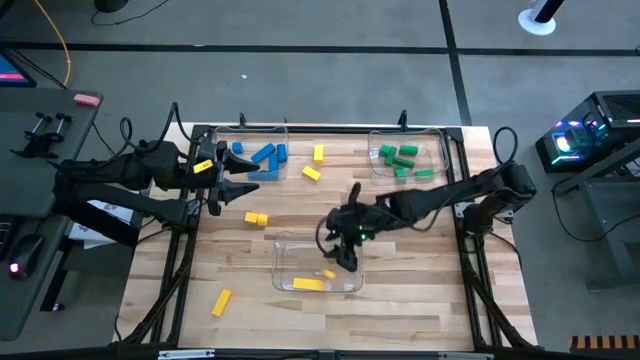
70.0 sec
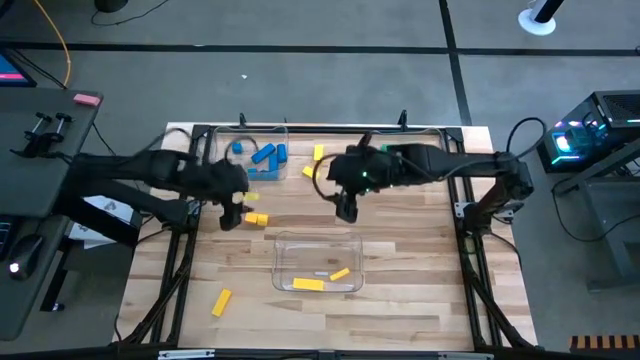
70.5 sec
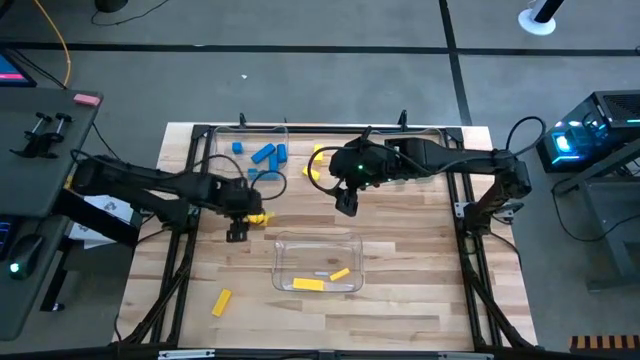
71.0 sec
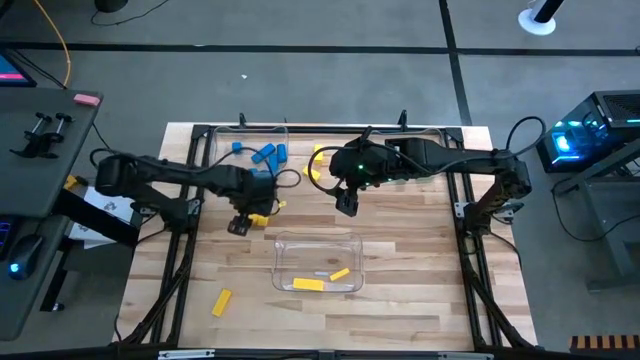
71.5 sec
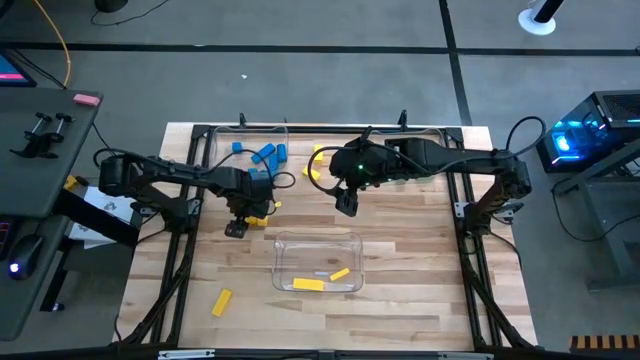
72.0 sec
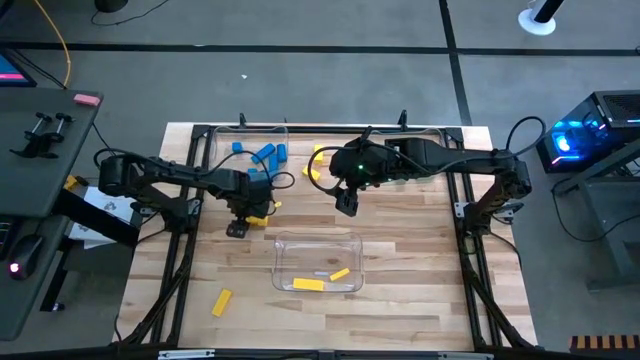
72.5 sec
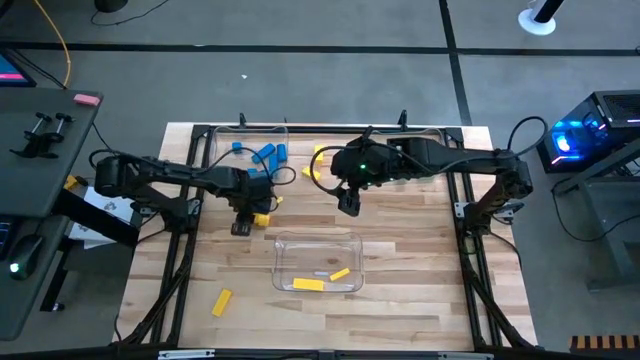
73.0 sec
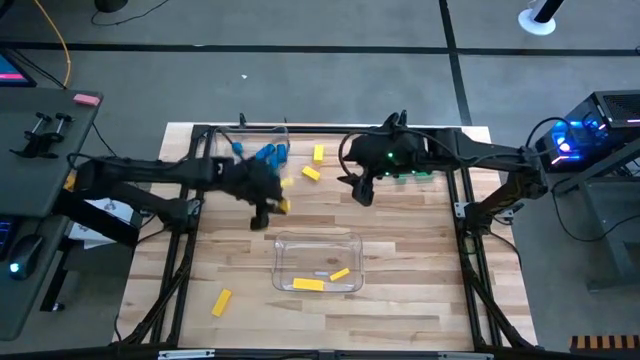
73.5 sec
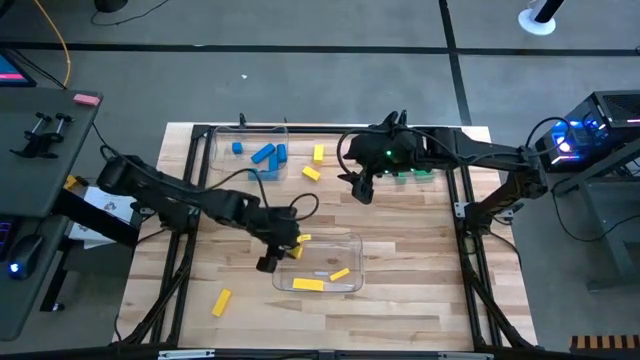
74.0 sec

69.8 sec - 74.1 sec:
Task: Sort blocks
Put the yellow block into the center transparent bin

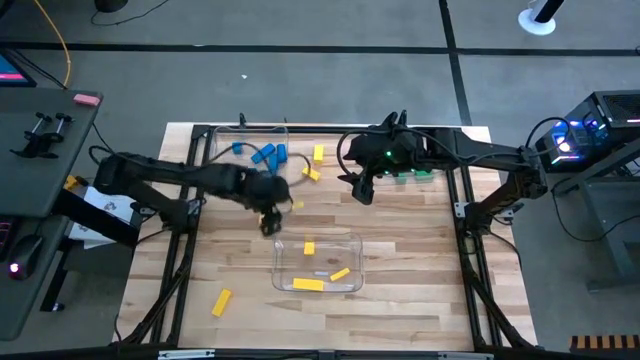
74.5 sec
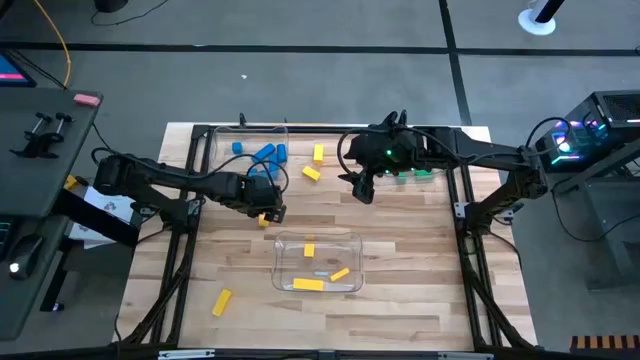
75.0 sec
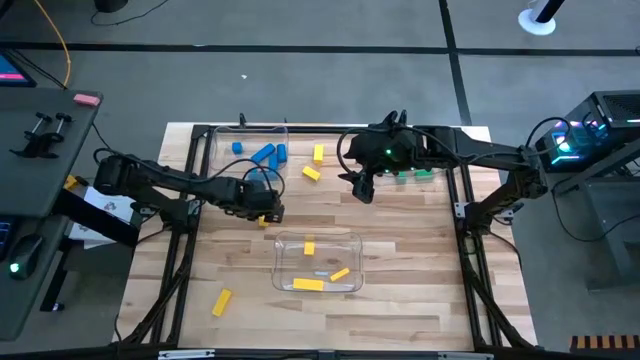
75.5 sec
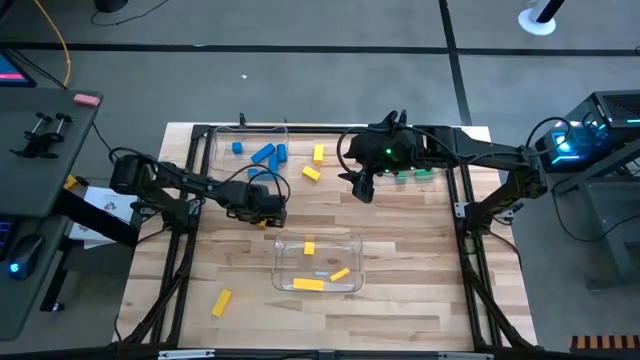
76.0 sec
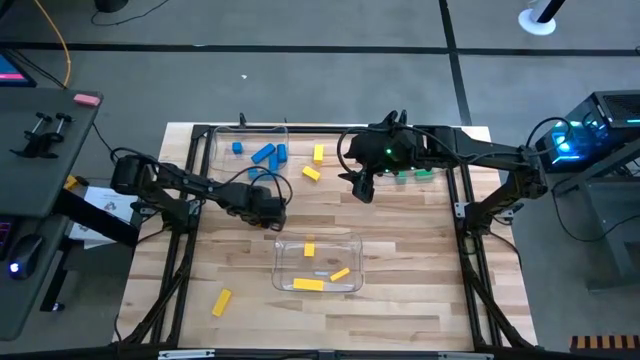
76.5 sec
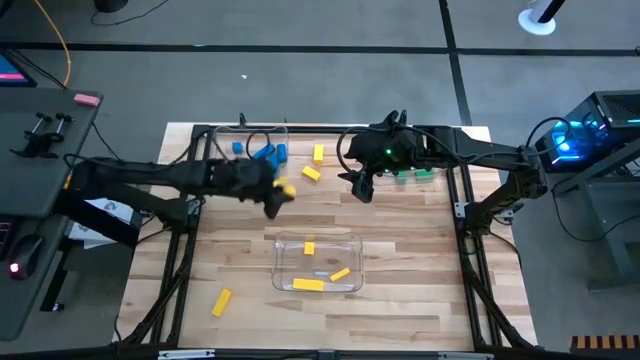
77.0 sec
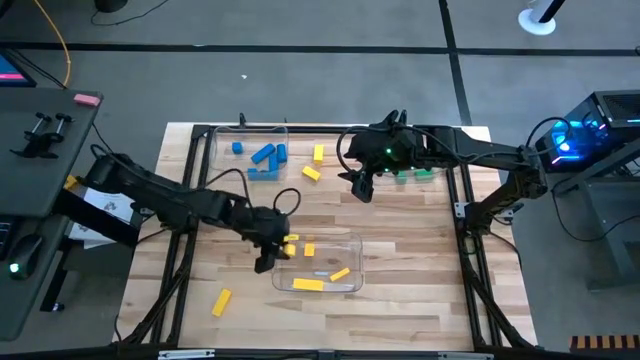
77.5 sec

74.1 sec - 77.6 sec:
Put the yellow block into the center transparent bin

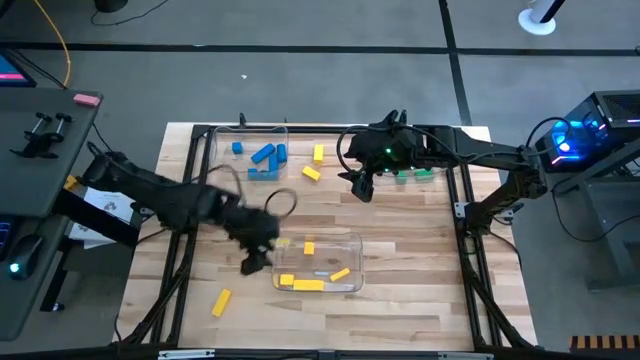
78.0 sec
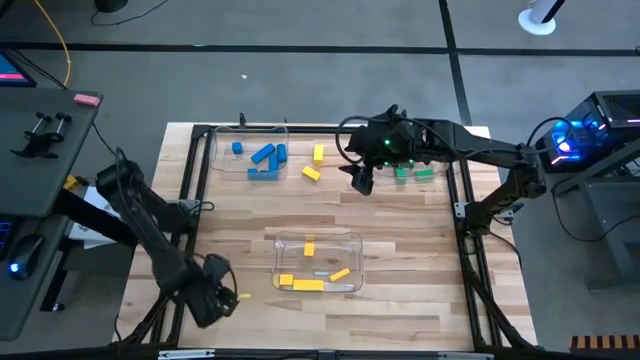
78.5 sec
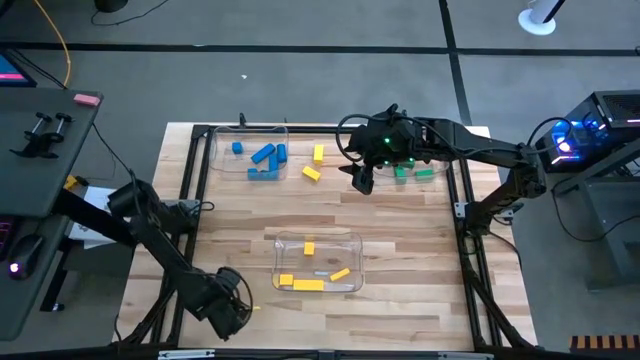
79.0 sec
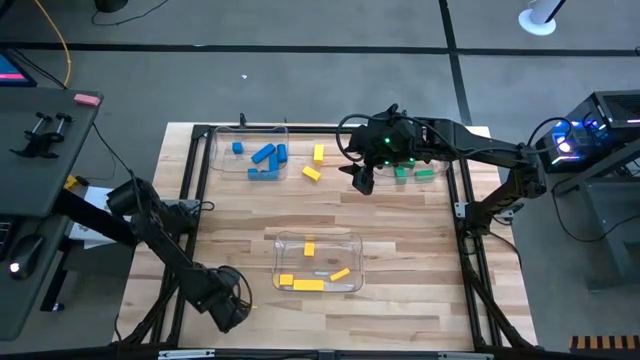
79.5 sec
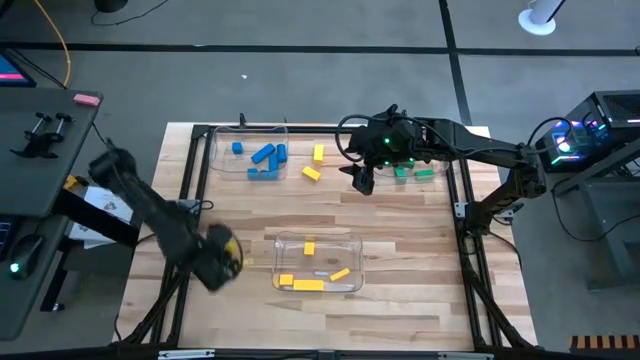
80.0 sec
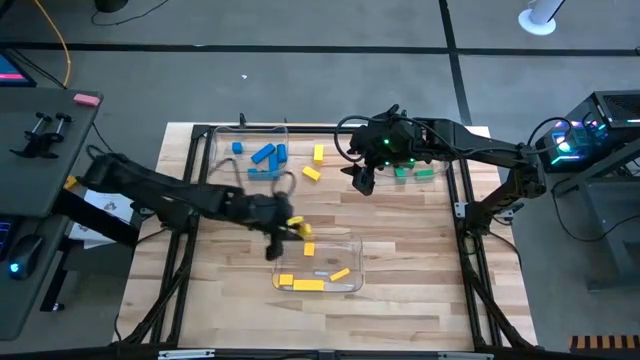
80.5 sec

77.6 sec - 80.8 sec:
Put the yellow block into the center transparent bin

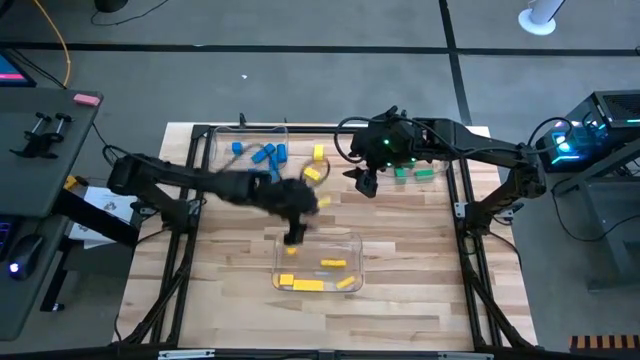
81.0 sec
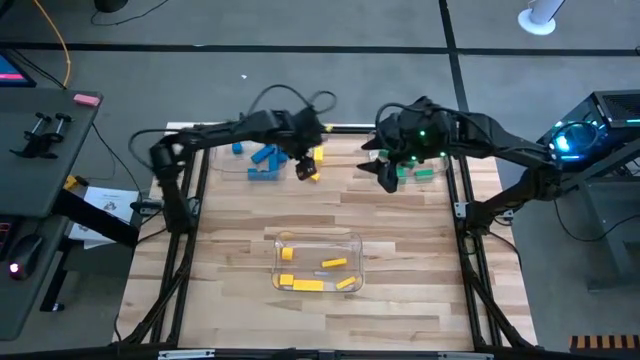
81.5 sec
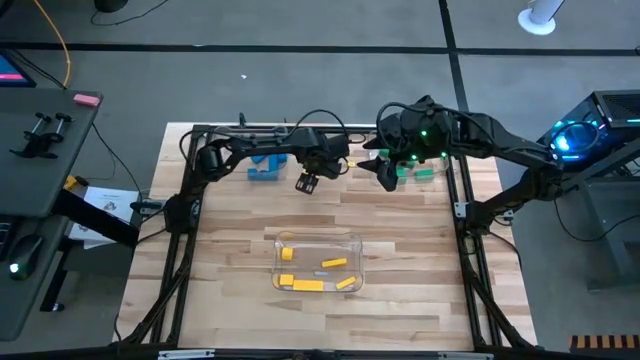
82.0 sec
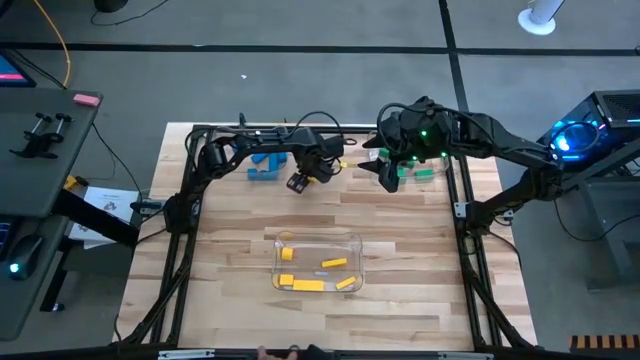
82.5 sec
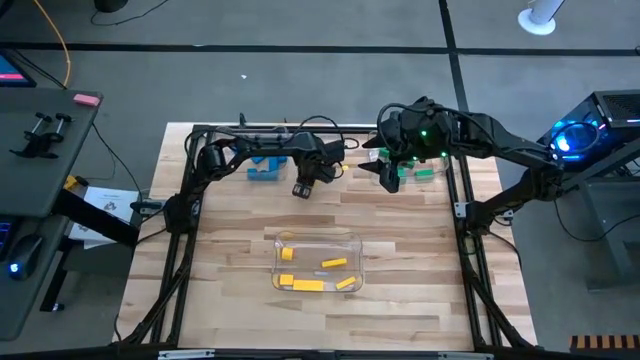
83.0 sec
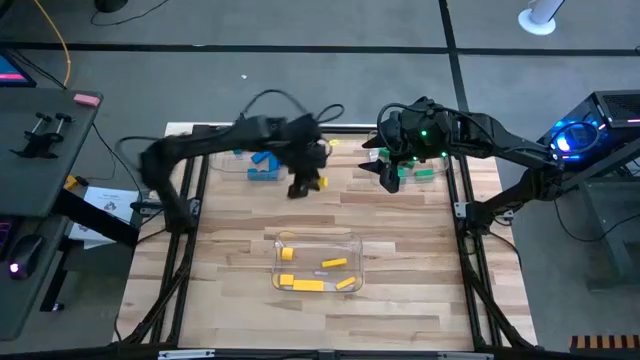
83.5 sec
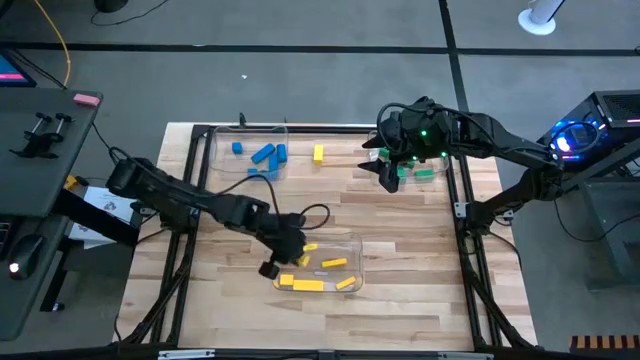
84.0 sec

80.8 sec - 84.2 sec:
Put the yellow block into the center transparent bin

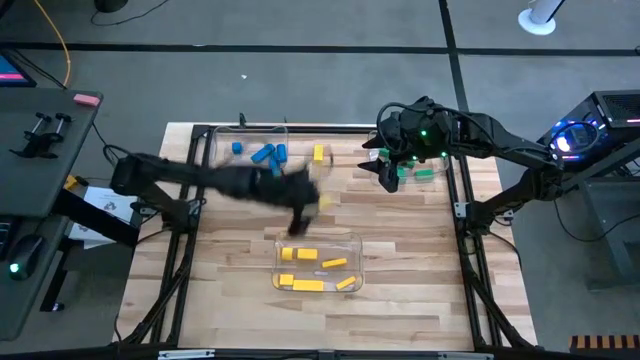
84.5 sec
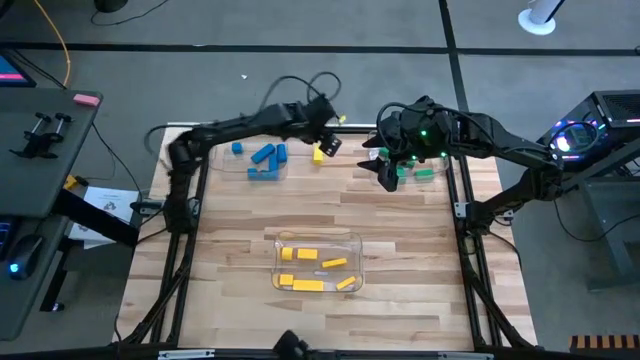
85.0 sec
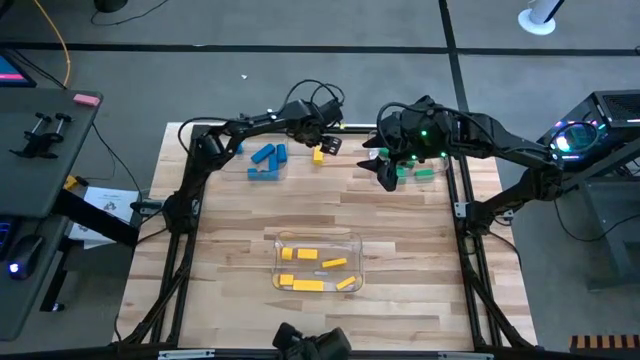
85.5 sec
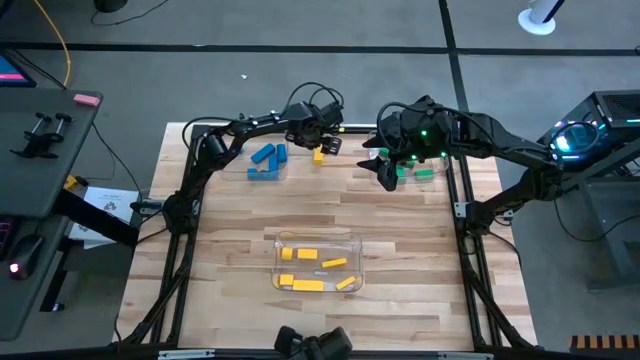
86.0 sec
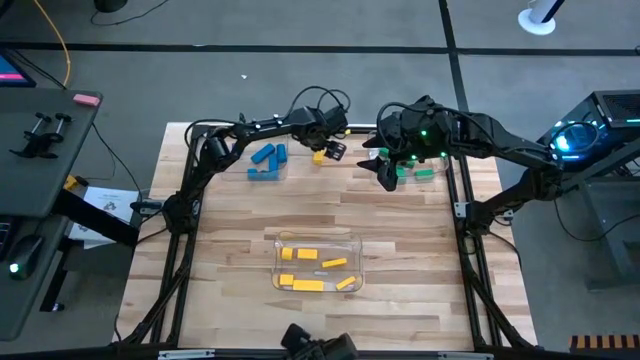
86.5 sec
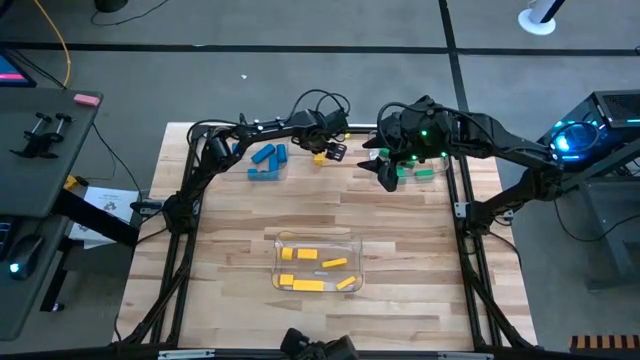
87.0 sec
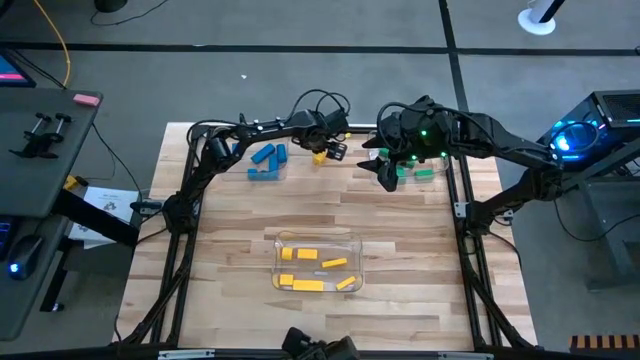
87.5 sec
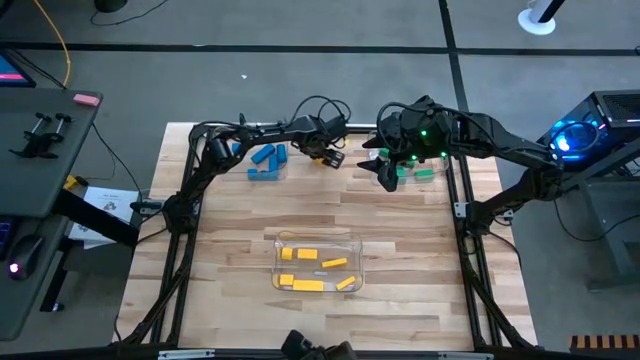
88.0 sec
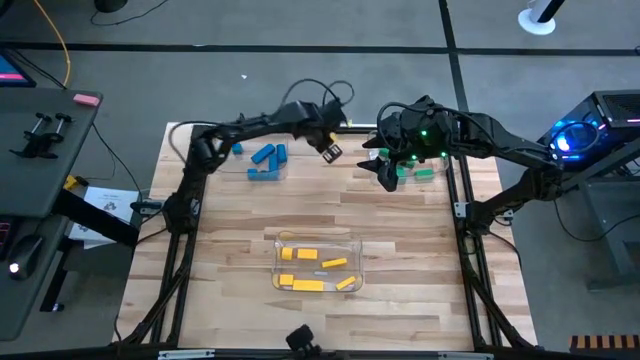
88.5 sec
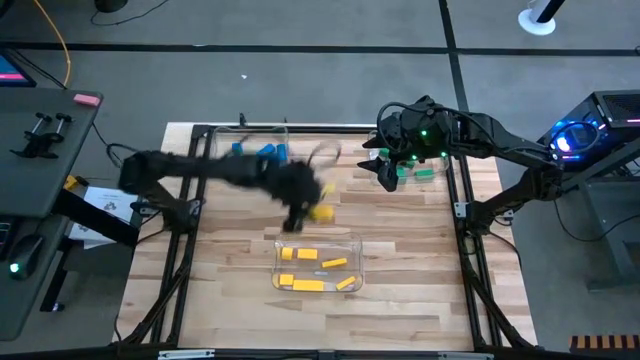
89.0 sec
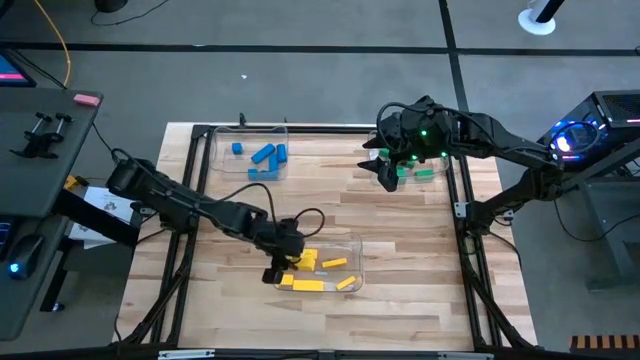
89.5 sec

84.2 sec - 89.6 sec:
Put the yellow block into the center transparent bin
